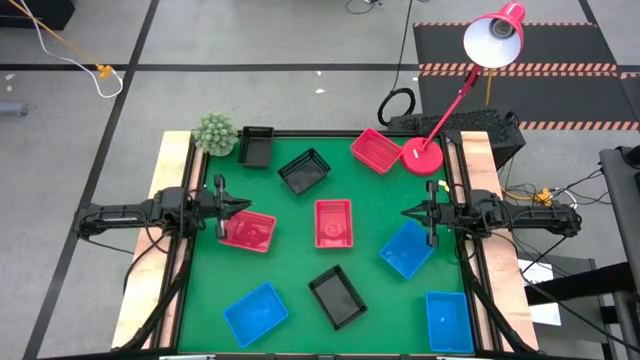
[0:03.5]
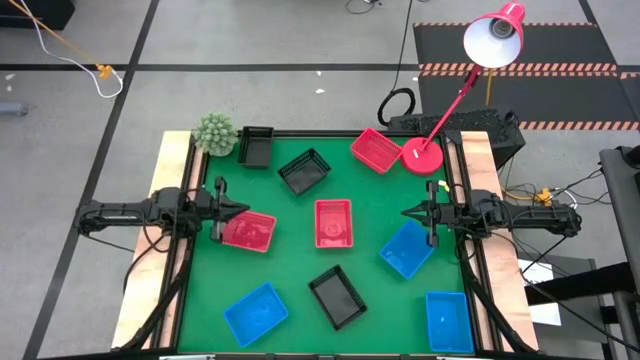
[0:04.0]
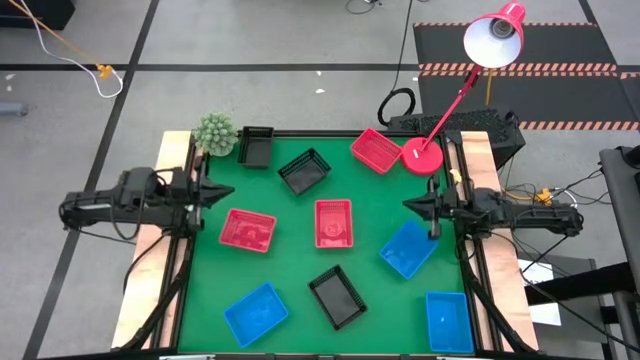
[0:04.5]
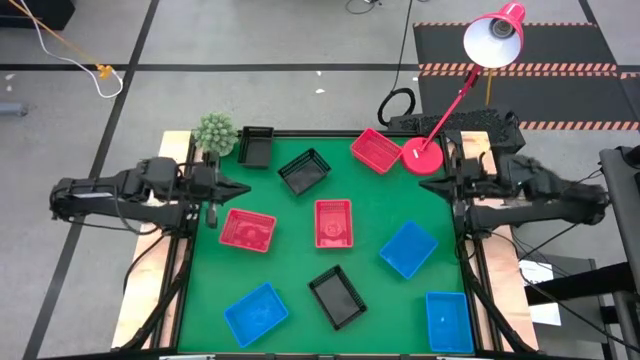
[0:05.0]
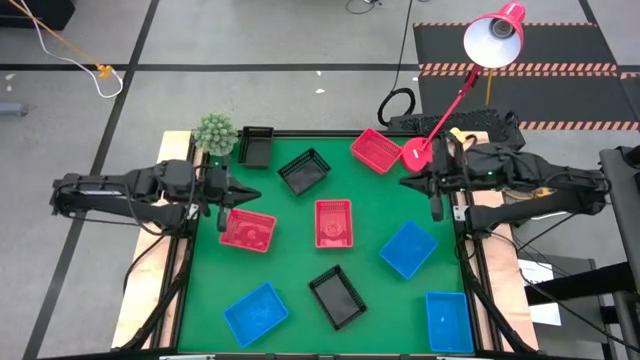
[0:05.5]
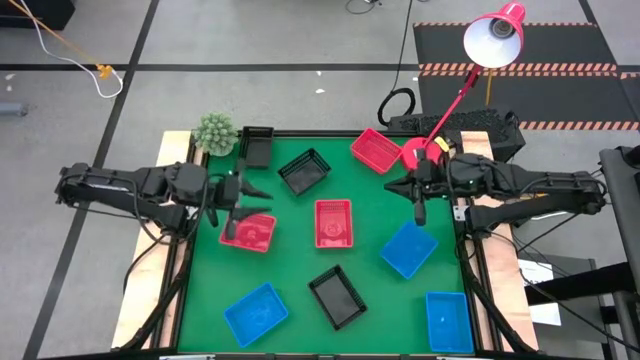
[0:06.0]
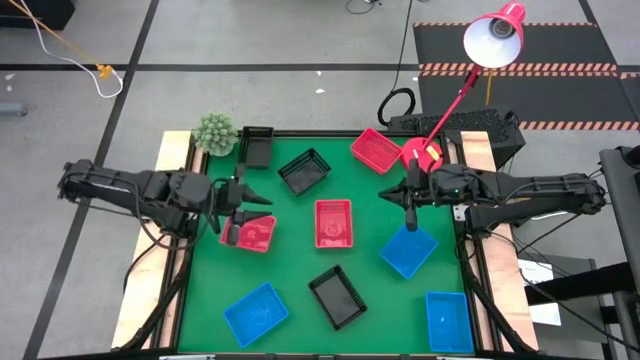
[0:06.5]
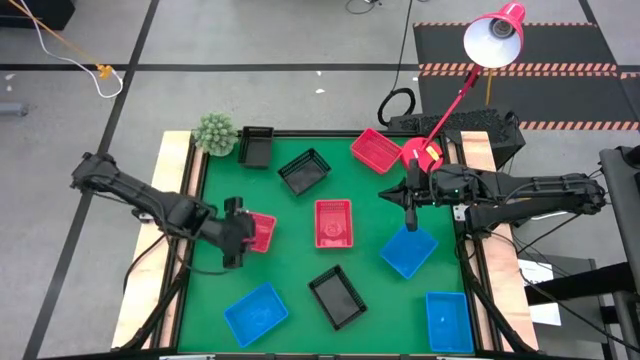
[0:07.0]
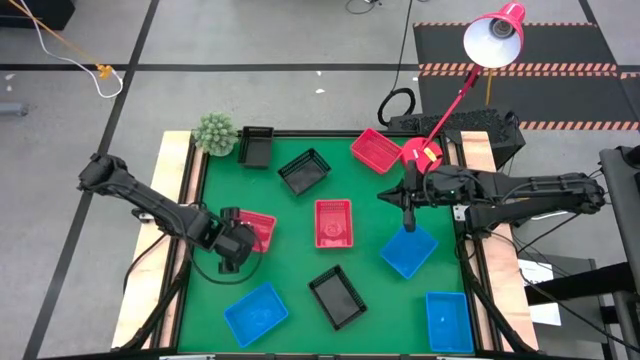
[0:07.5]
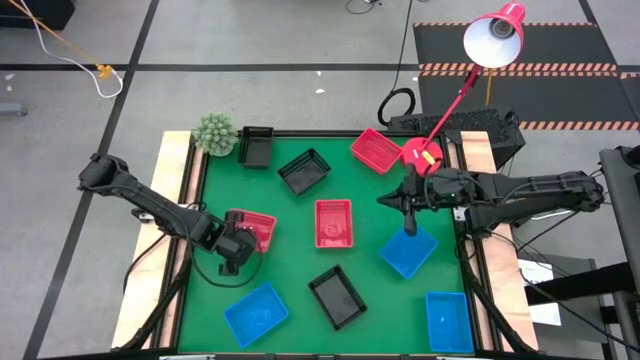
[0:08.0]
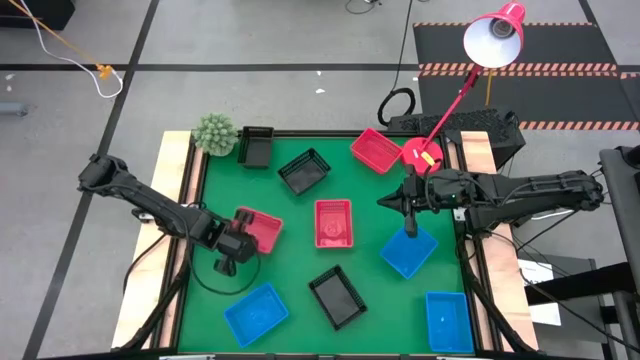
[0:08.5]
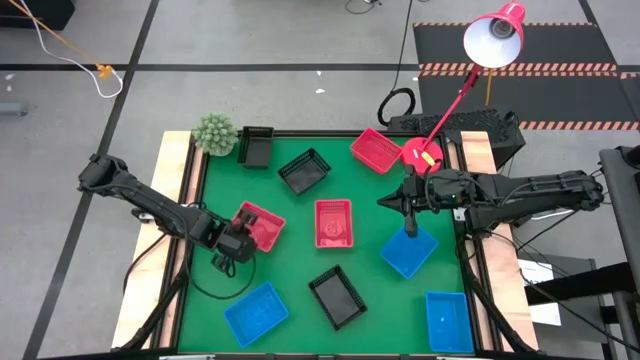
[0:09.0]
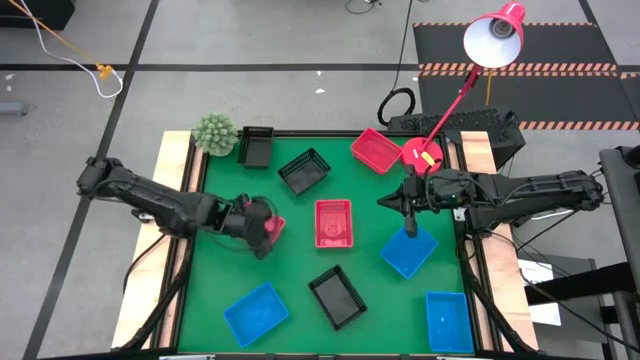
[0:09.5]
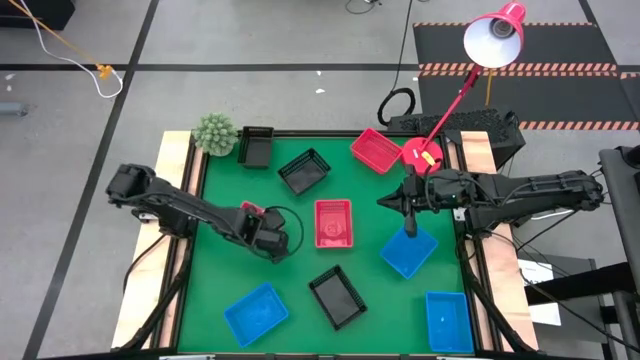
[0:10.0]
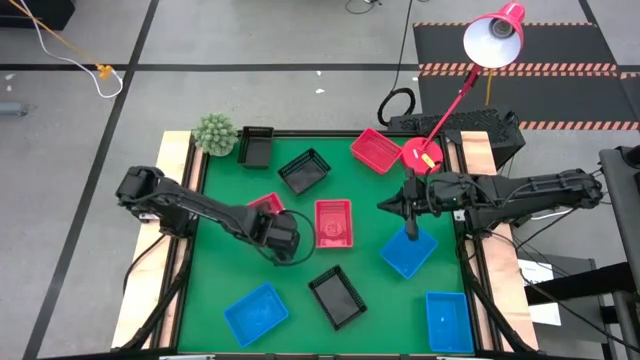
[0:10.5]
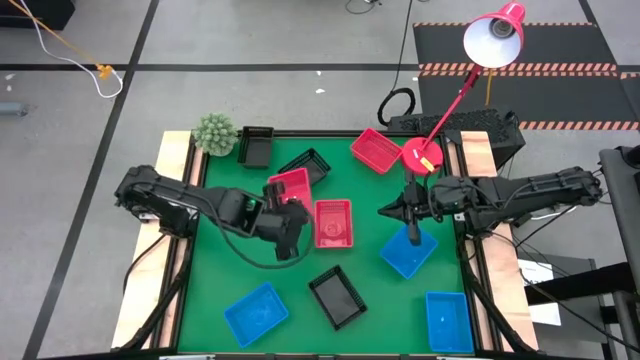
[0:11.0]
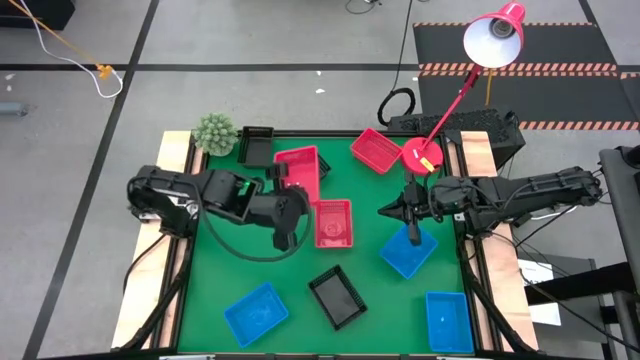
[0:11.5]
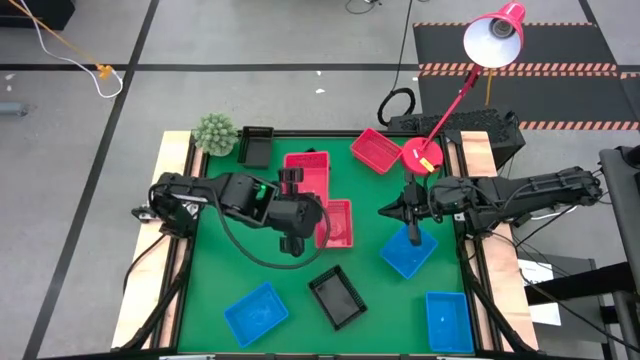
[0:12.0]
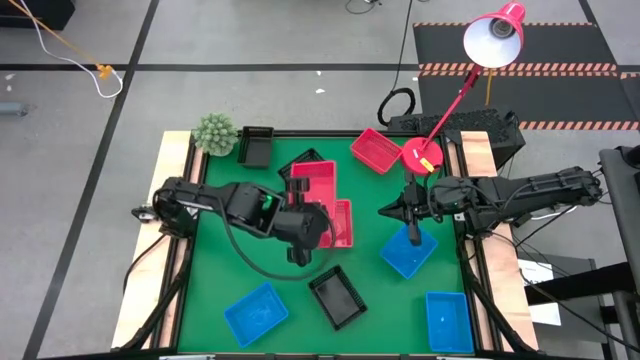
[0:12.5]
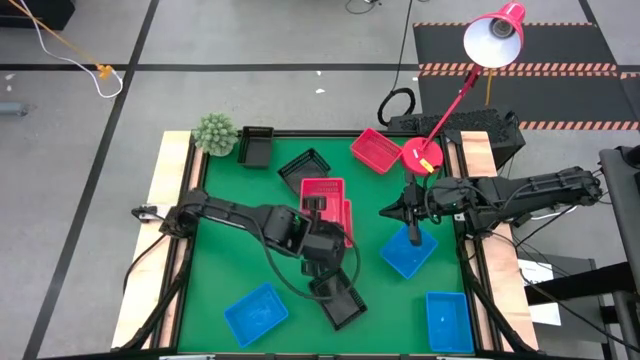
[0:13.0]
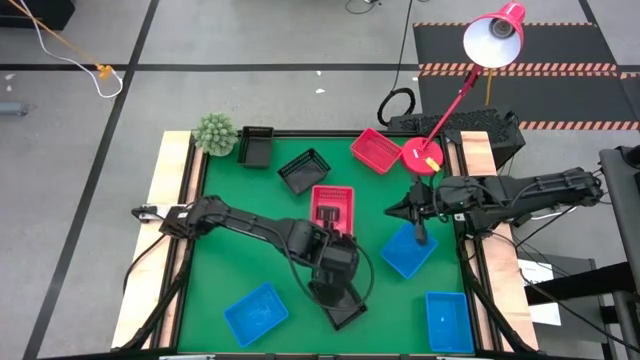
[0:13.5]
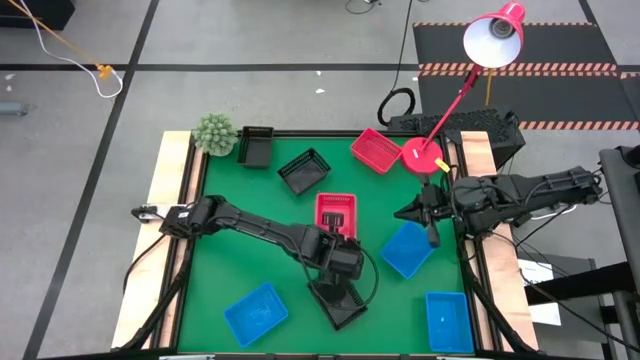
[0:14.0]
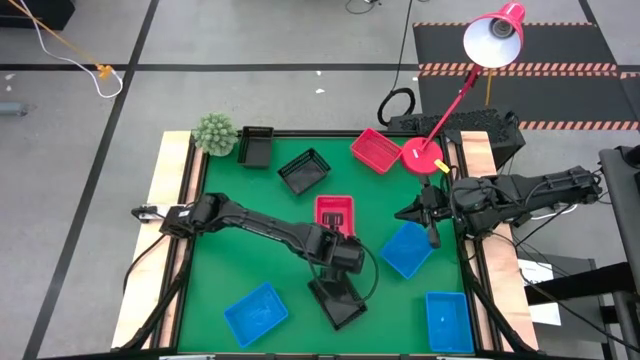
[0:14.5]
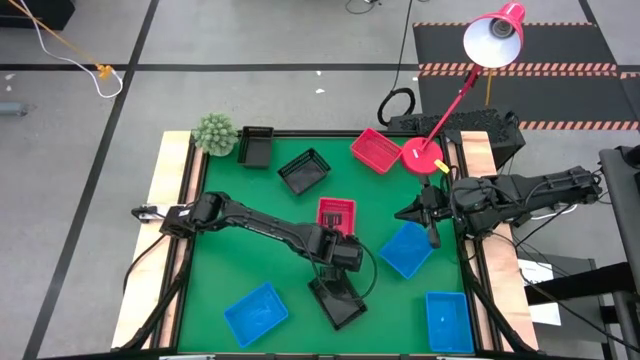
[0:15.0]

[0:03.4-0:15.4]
Stack the bottom left red bin on the other bottom middle red bin

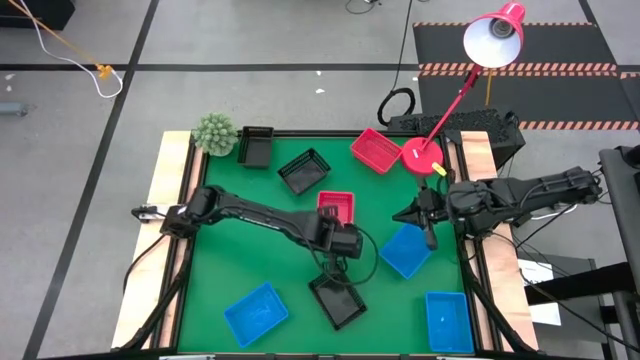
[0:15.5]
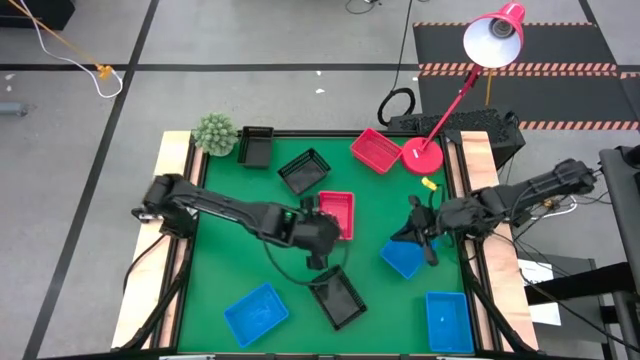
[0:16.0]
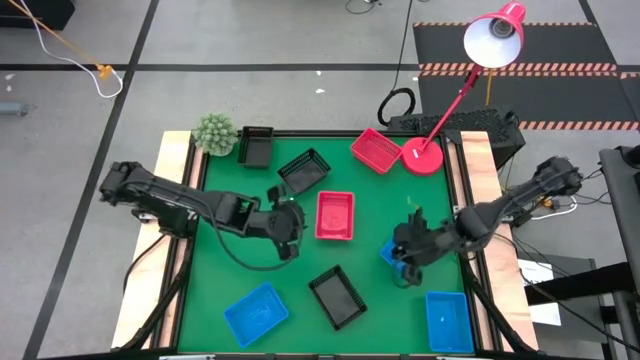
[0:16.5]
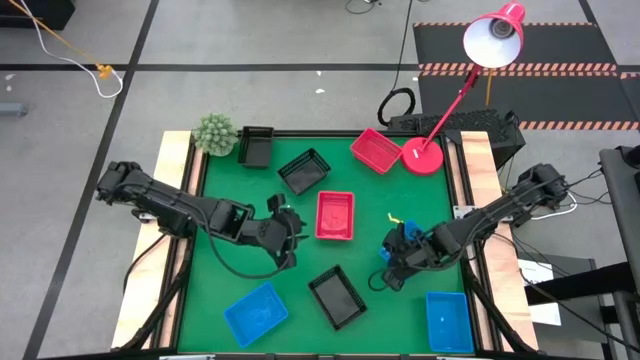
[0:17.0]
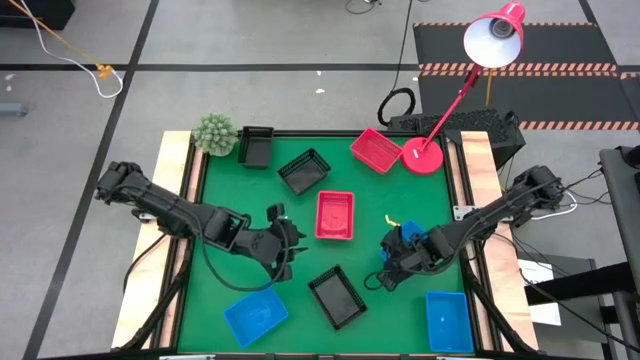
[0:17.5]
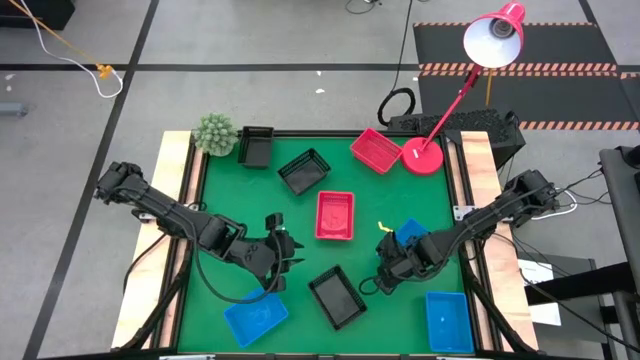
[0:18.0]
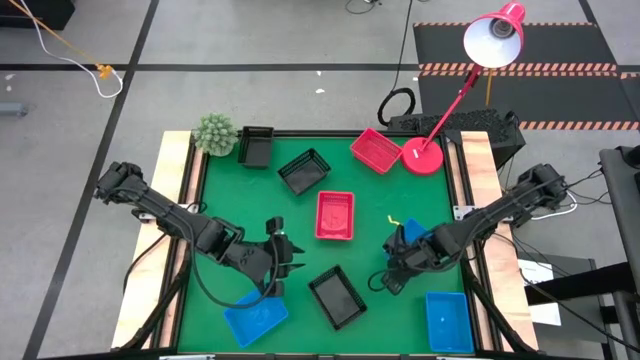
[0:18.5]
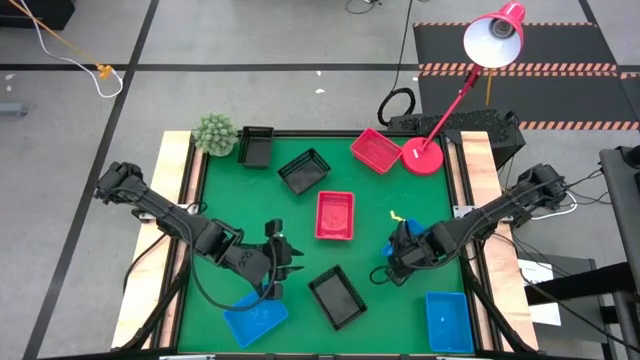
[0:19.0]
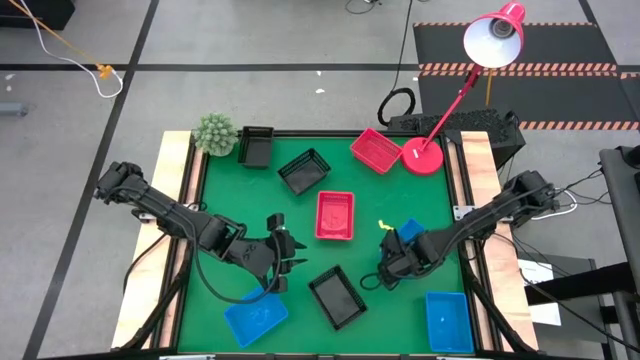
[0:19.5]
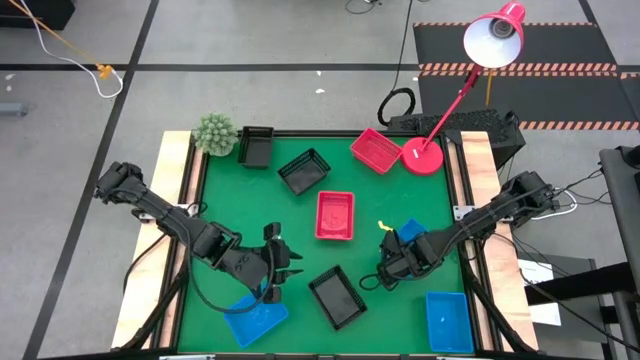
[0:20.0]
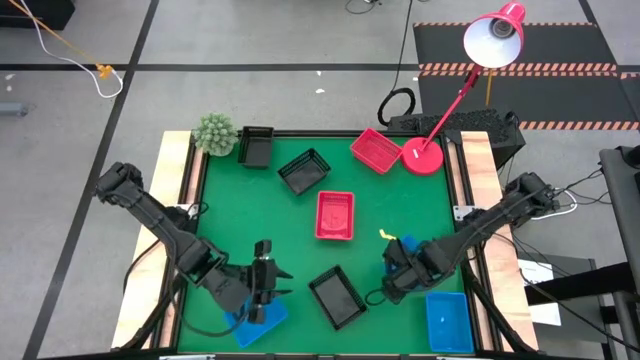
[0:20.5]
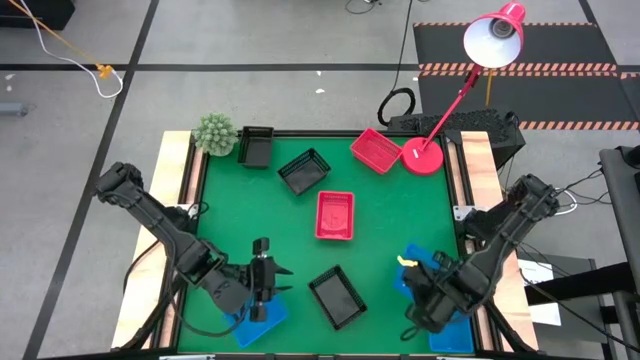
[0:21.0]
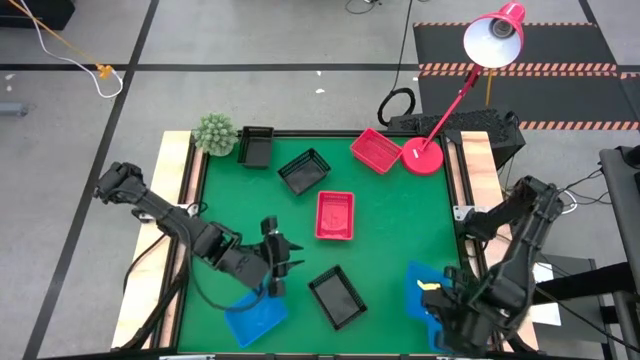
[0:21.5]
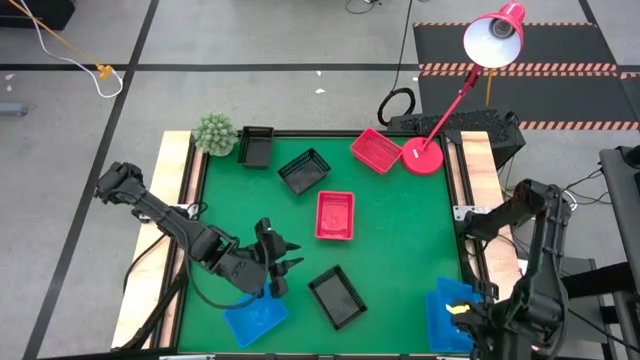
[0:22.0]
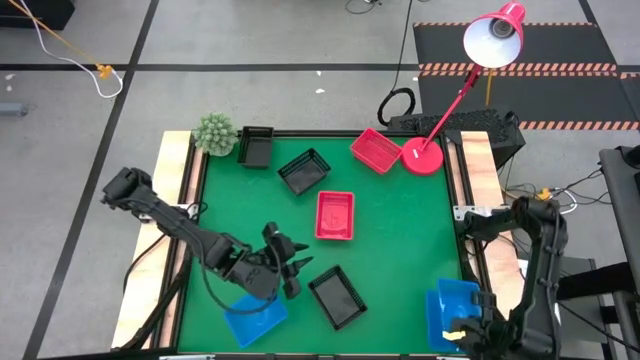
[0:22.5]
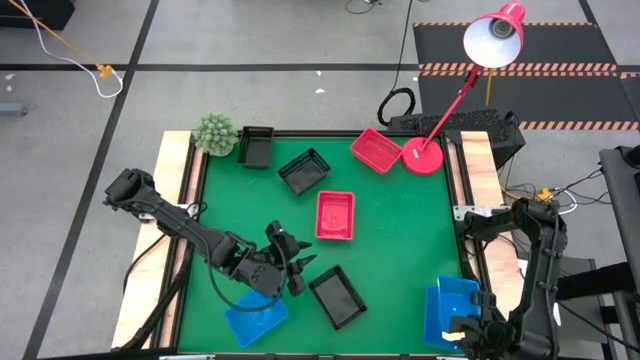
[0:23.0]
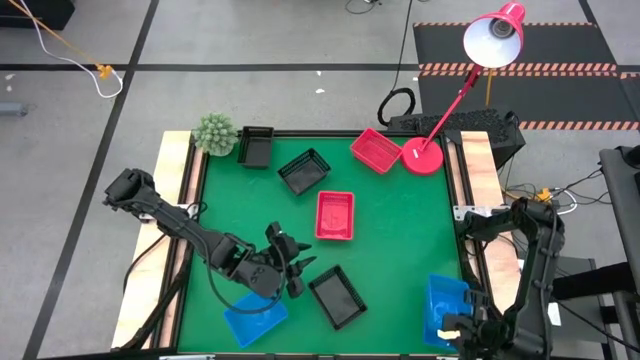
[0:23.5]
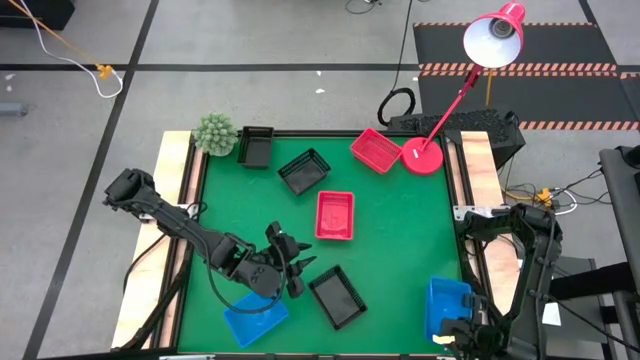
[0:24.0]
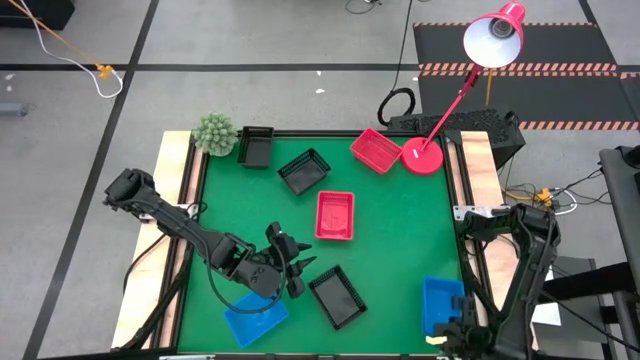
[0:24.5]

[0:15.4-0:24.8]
Stack the top right blue bin on the other bottom right blue bin
